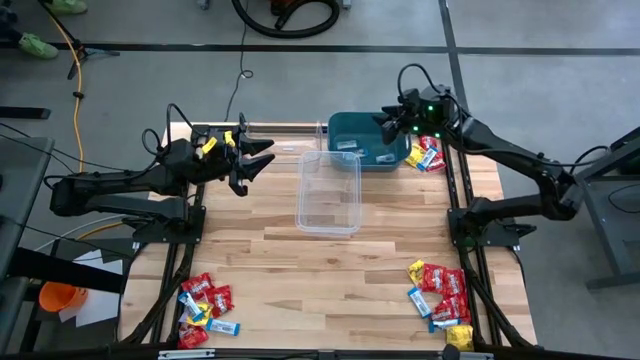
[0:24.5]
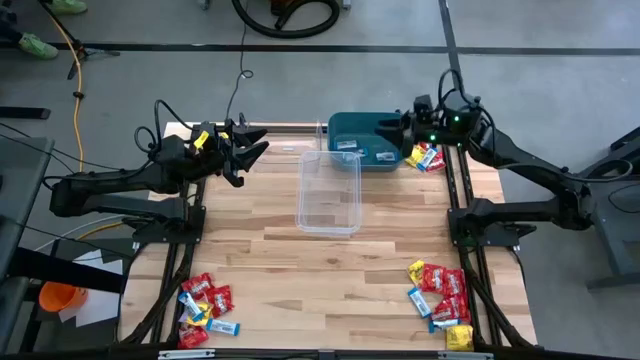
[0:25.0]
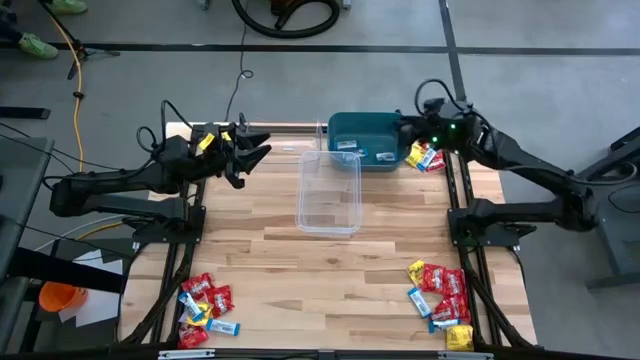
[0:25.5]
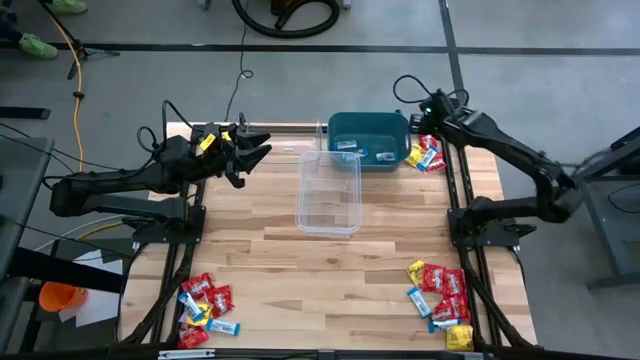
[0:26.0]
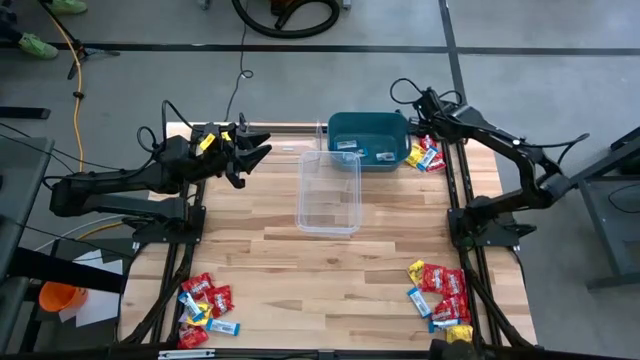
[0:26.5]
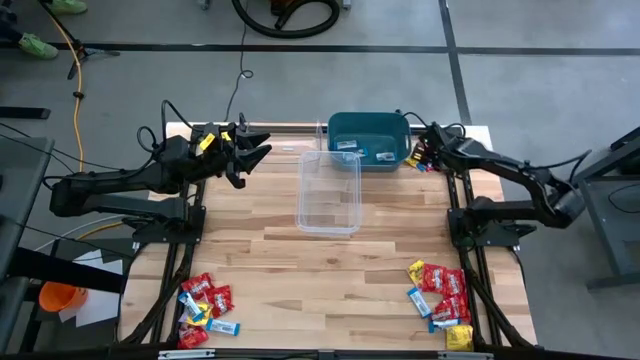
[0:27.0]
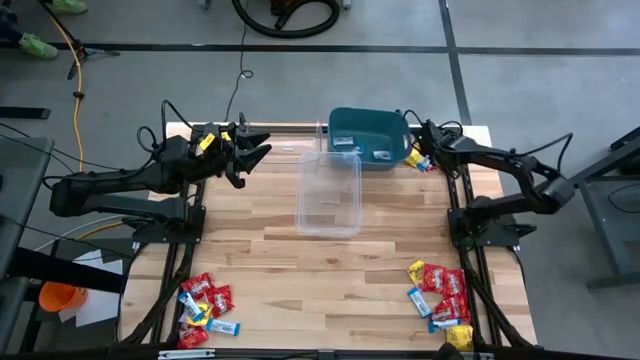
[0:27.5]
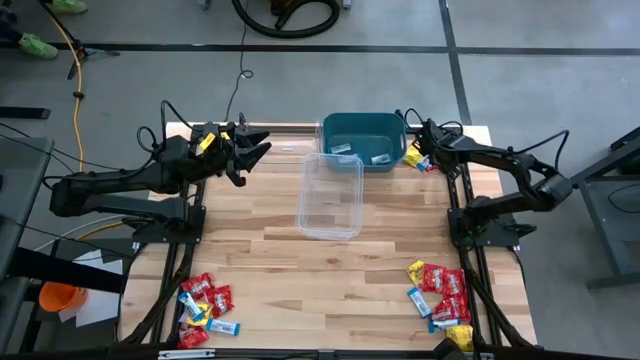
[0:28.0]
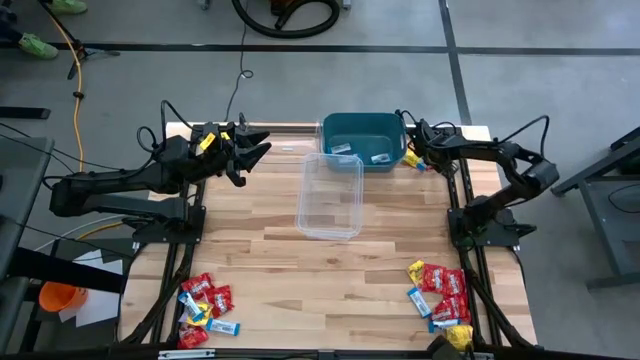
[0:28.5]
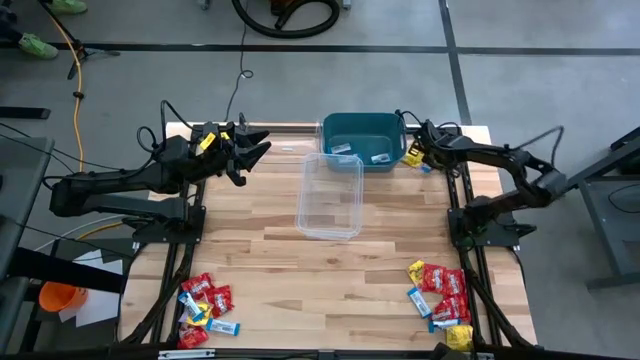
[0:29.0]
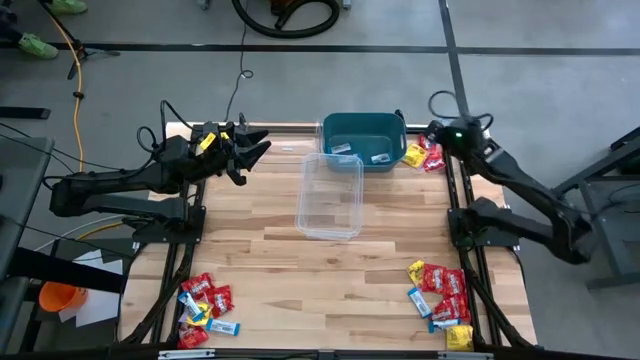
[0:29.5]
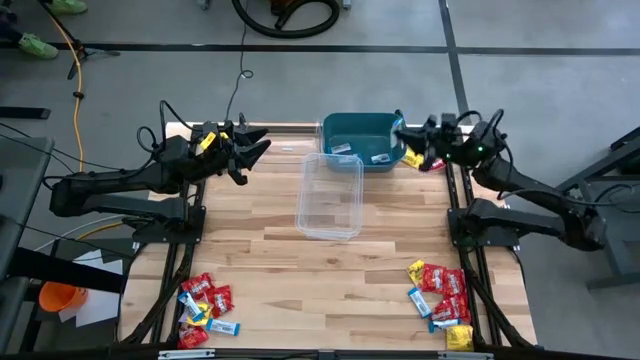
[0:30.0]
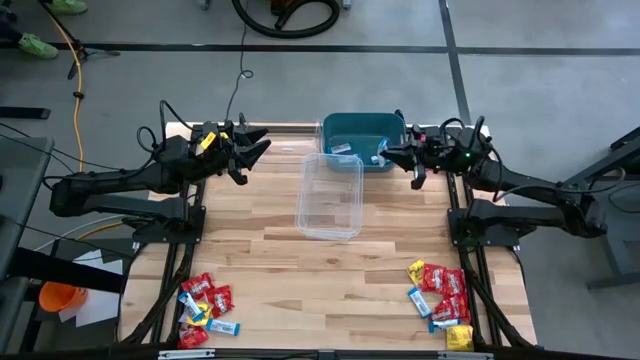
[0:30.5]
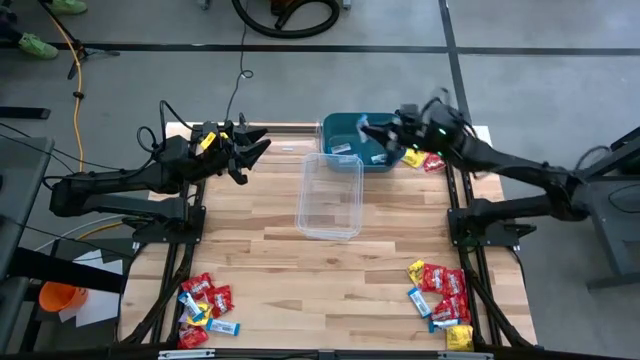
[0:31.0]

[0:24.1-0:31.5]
Task: Sort candy
Put the white chocolate into the blue bin

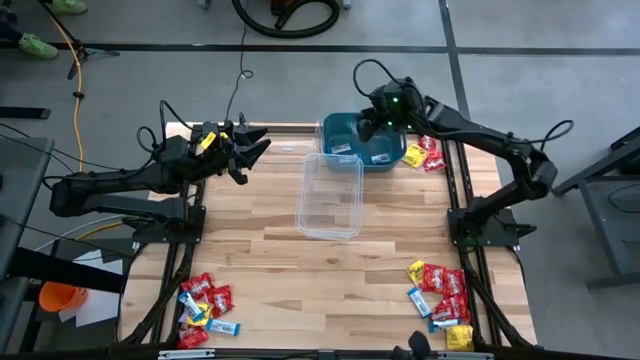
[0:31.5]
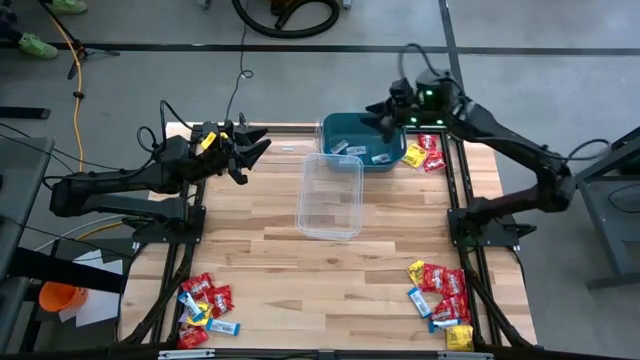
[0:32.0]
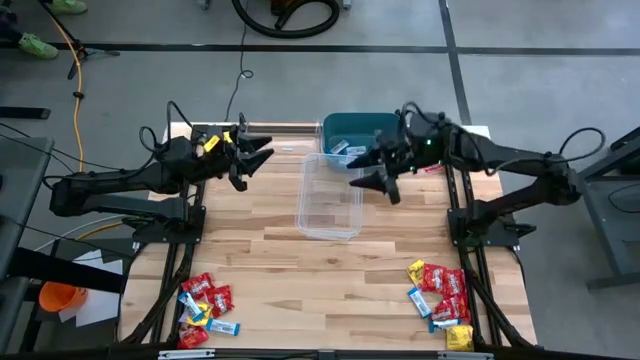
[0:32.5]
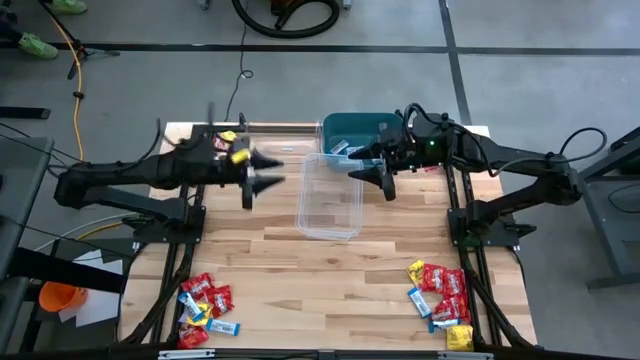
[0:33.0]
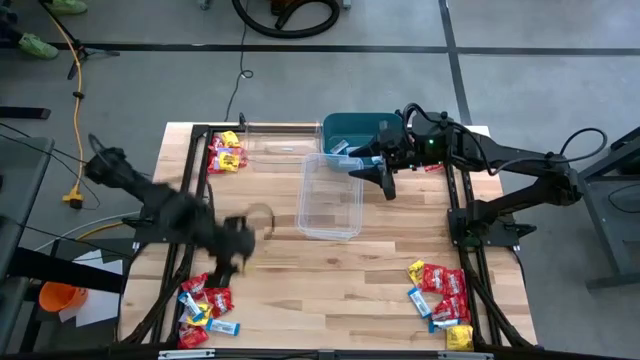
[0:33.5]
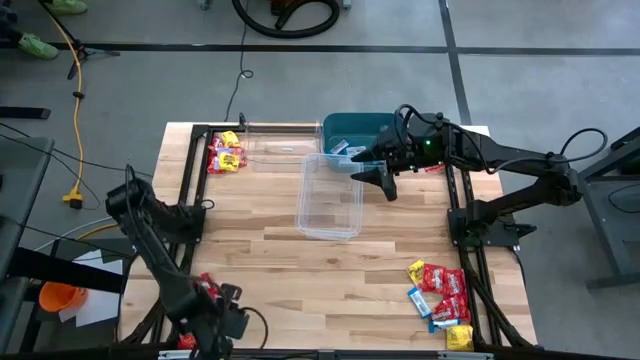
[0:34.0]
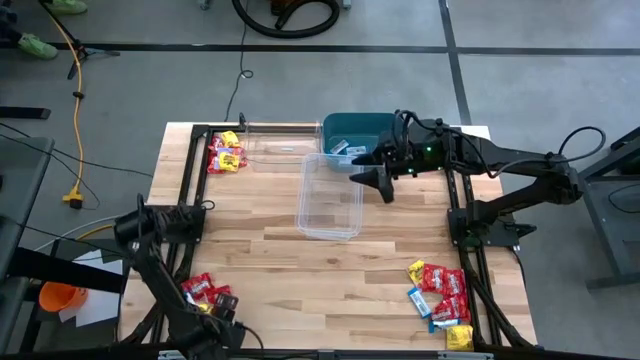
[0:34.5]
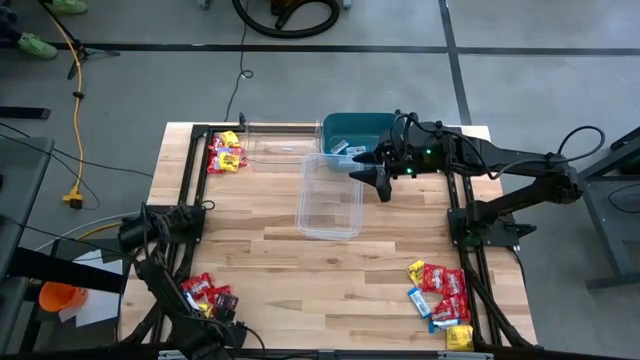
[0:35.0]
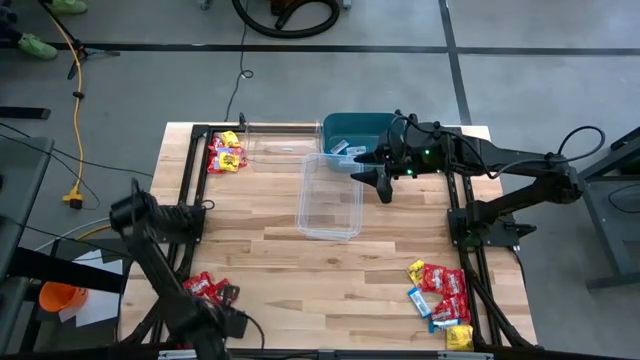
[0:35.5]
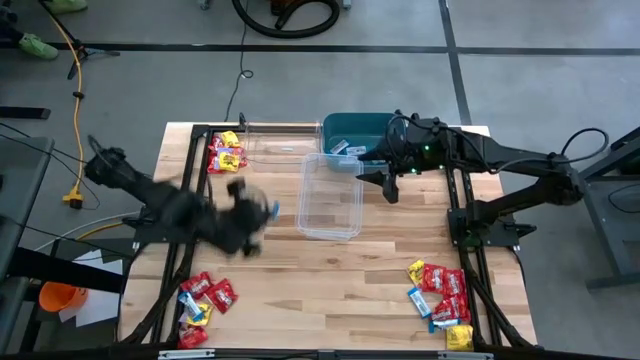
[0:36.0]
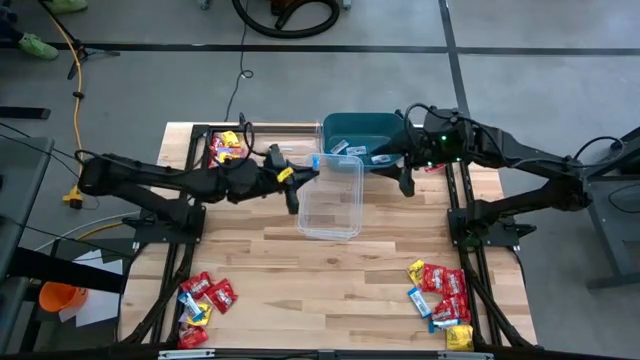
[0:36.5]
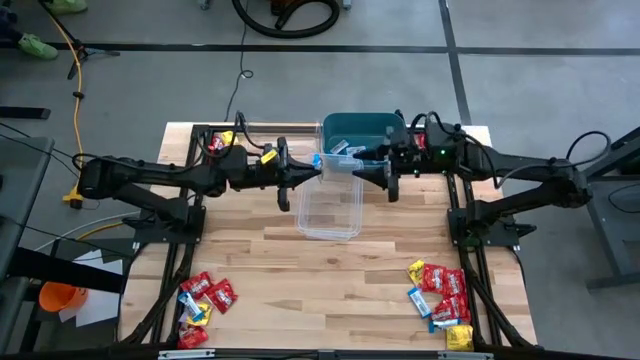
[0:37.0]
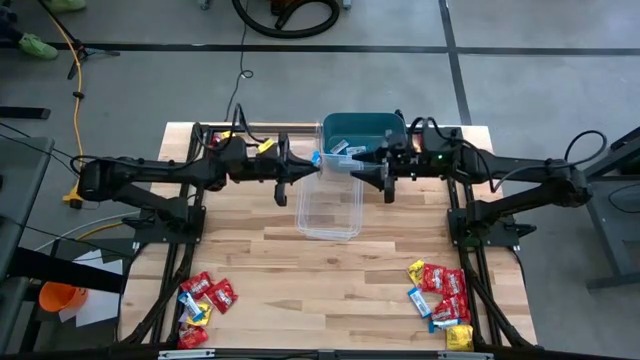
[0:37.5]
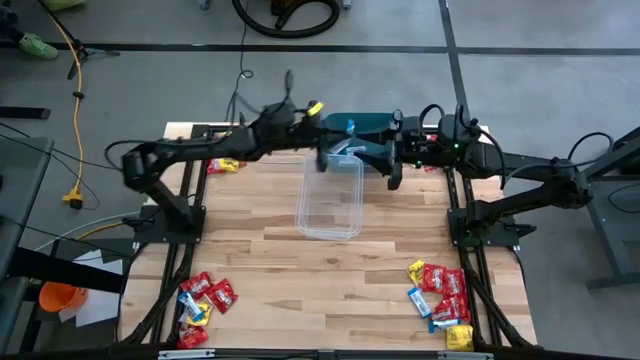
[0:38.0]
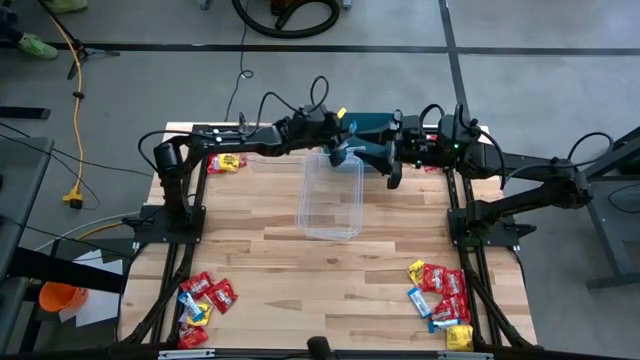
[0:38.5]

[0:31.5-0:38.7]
Put the white chocolate into the blue bin

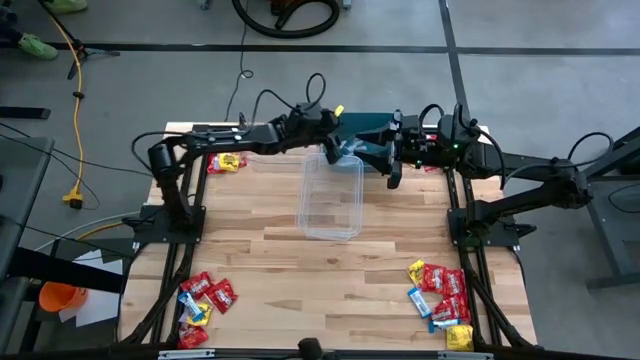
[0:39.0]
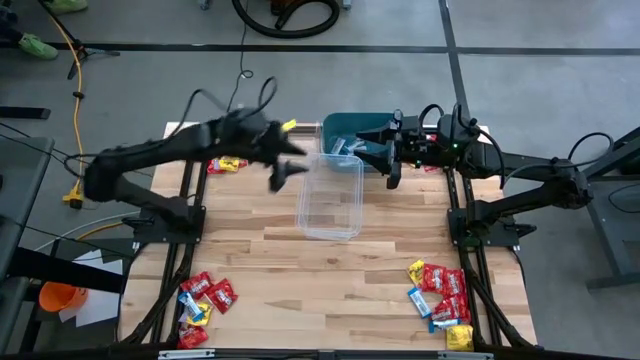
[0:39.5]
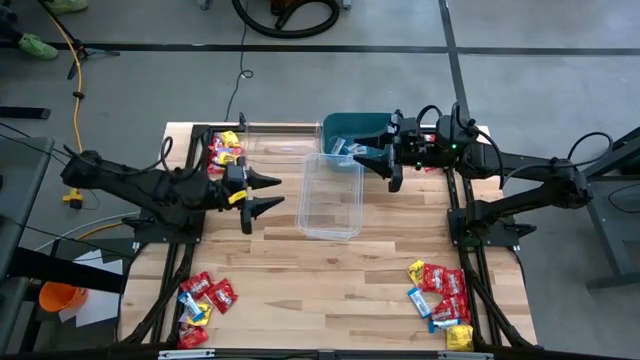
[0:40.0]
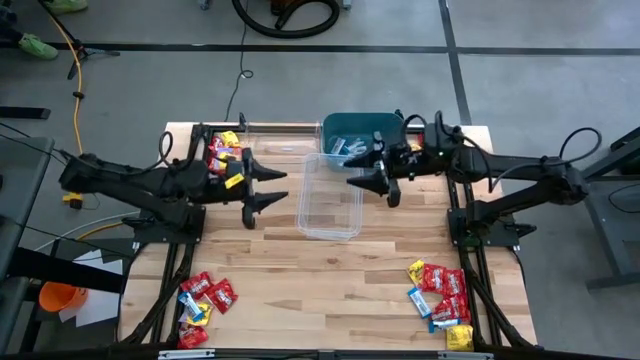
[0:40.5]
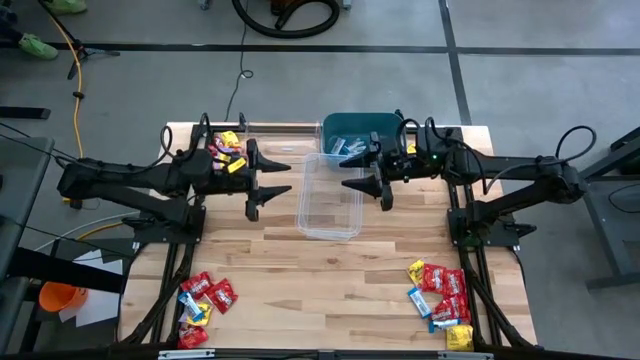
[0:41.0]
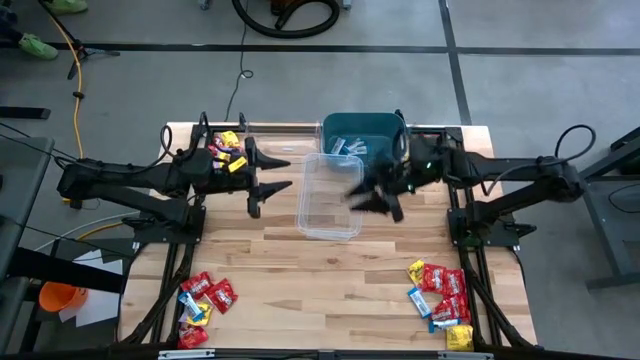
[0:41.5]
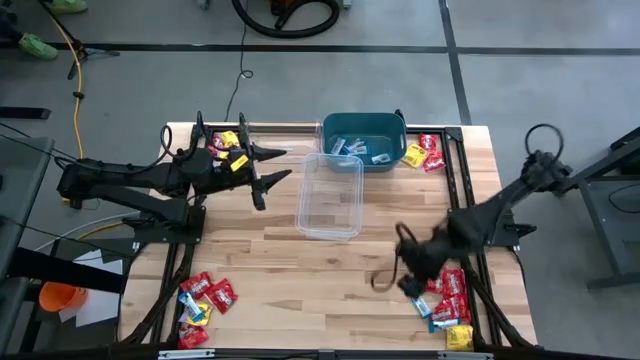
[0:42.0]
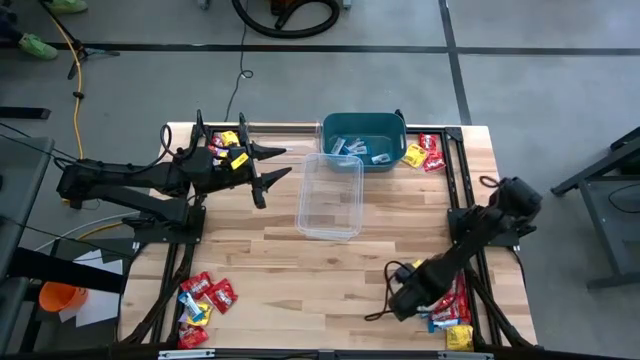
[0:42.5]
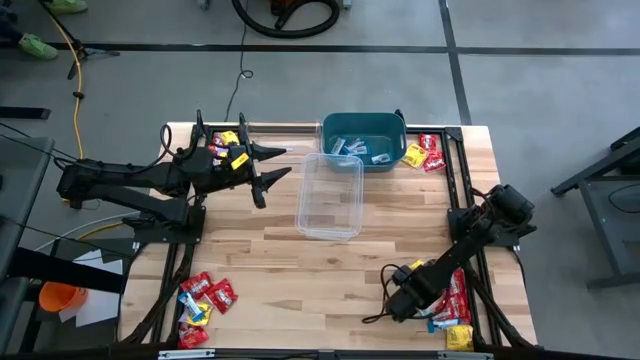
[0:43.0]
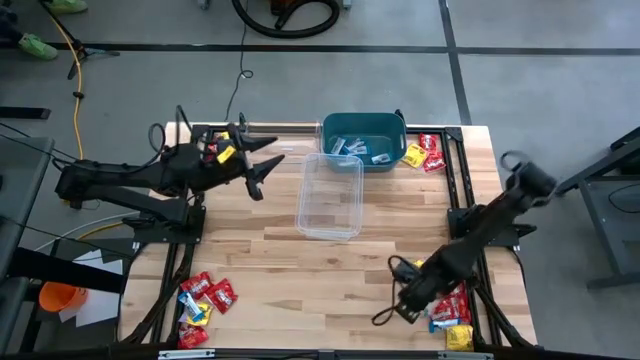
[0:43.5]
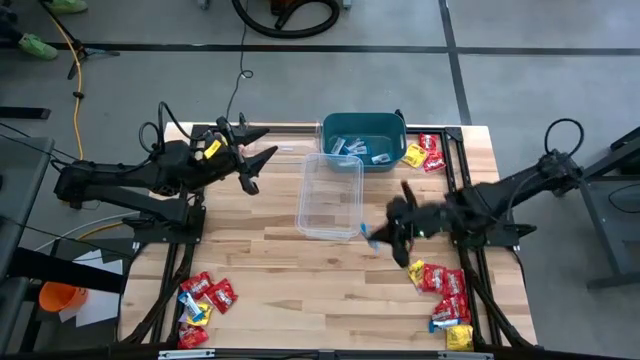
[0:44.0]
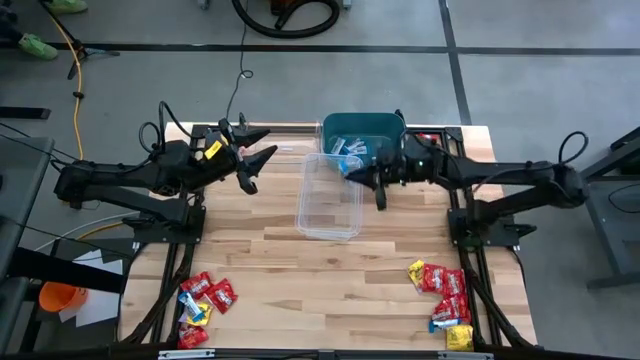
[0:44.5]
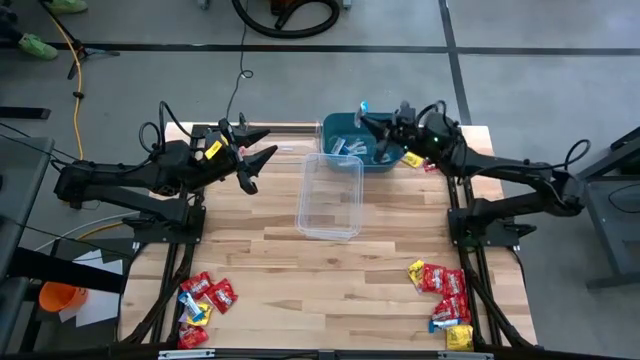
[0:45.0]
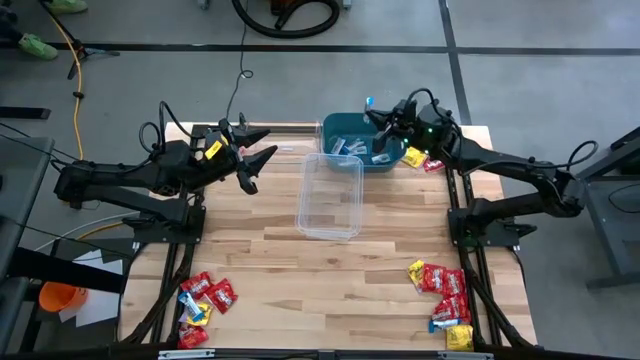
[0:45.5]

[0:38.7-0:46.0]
Put the white chocolate into the blue bin
